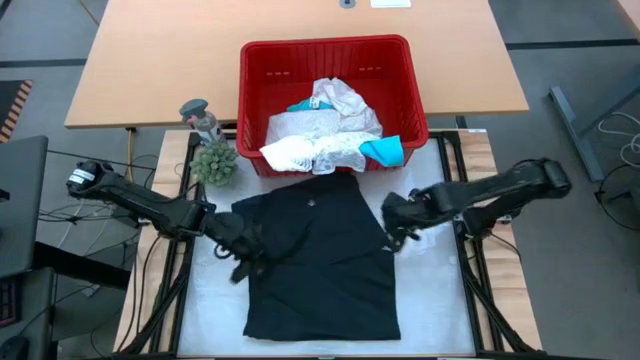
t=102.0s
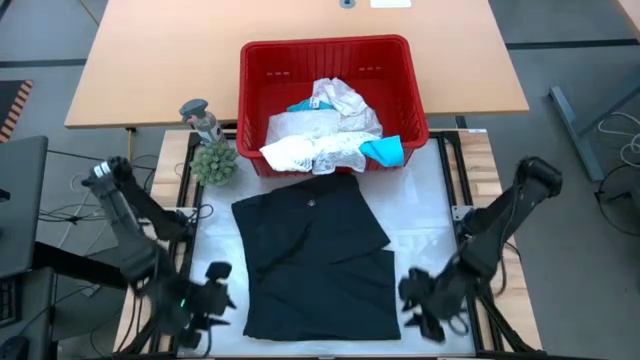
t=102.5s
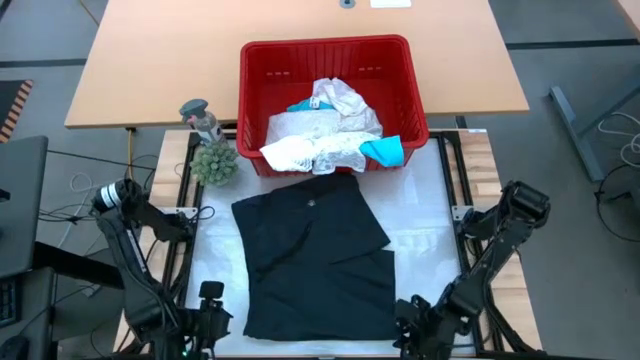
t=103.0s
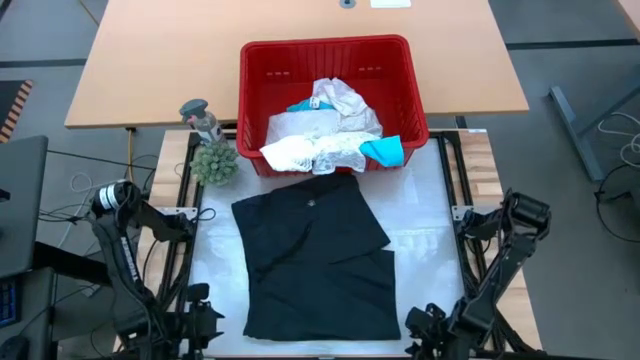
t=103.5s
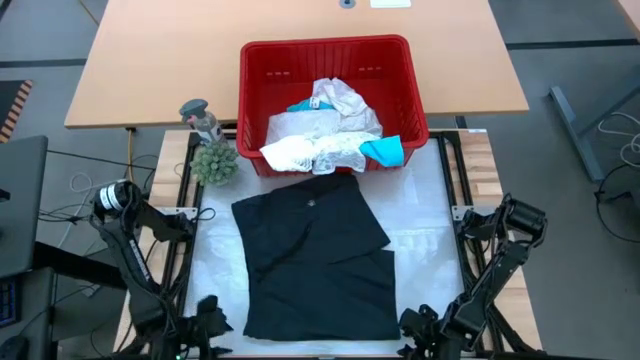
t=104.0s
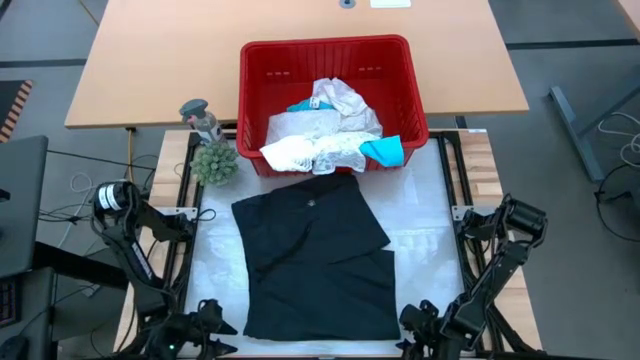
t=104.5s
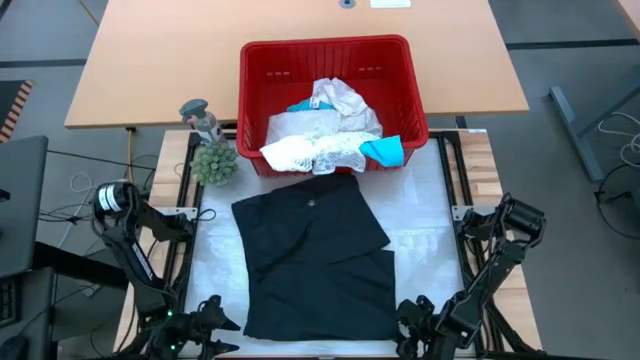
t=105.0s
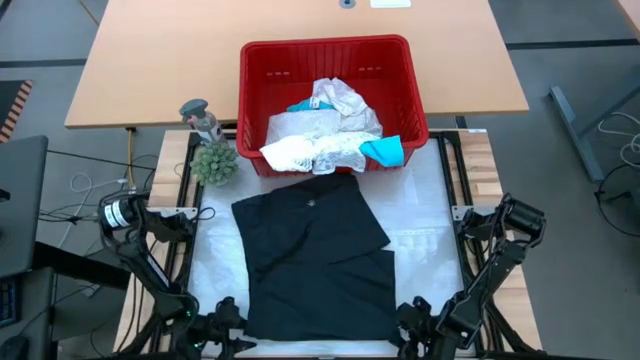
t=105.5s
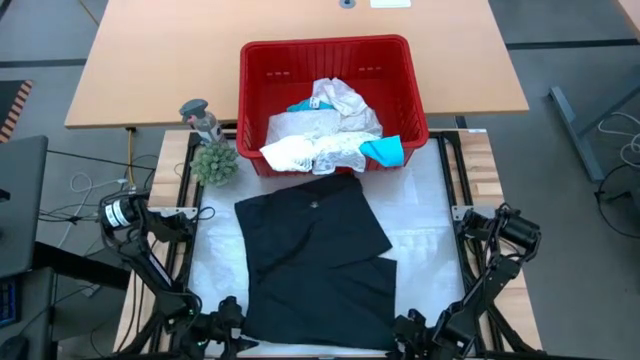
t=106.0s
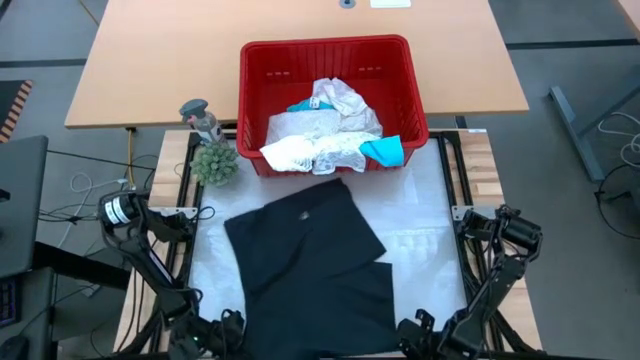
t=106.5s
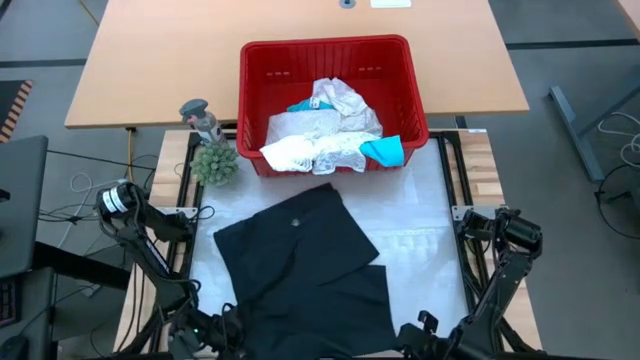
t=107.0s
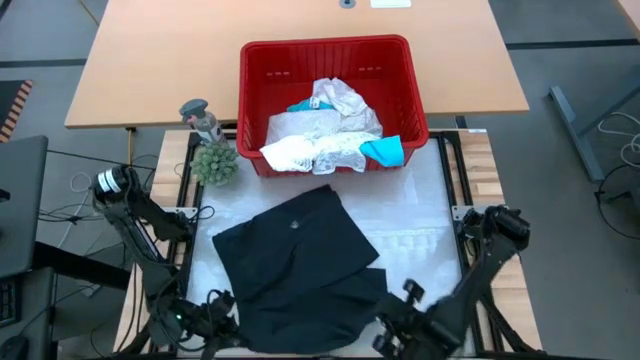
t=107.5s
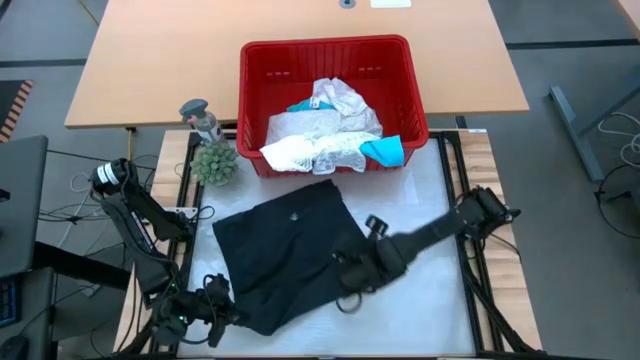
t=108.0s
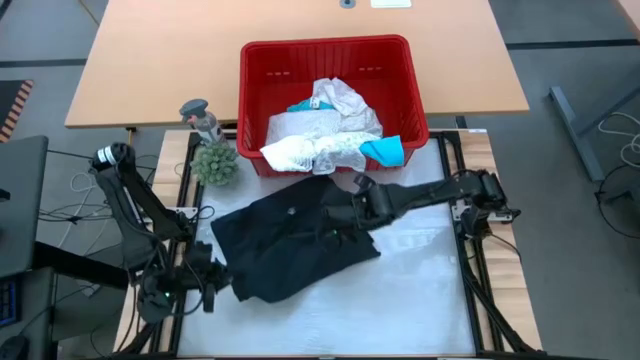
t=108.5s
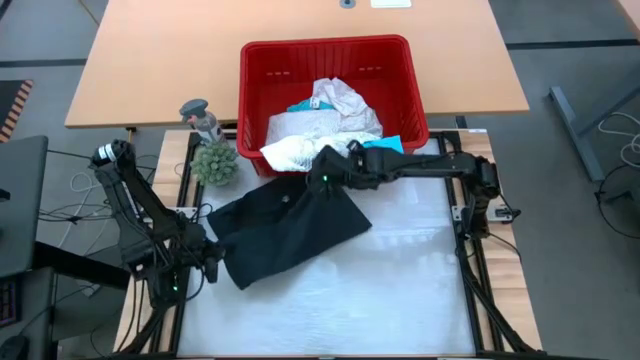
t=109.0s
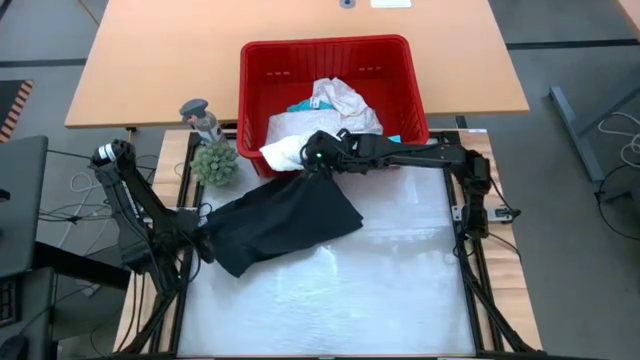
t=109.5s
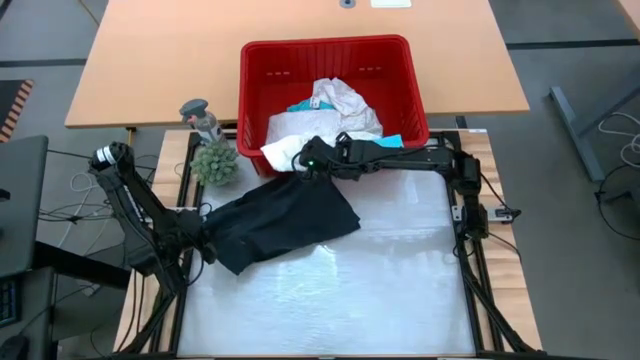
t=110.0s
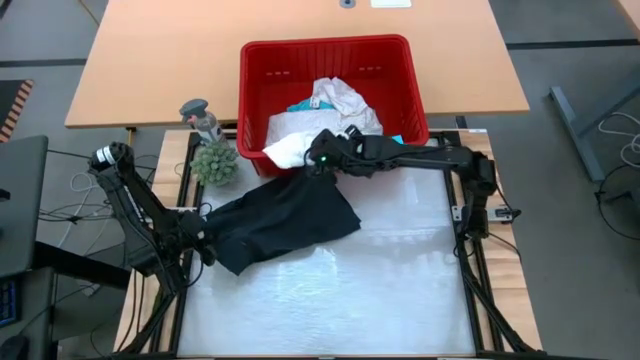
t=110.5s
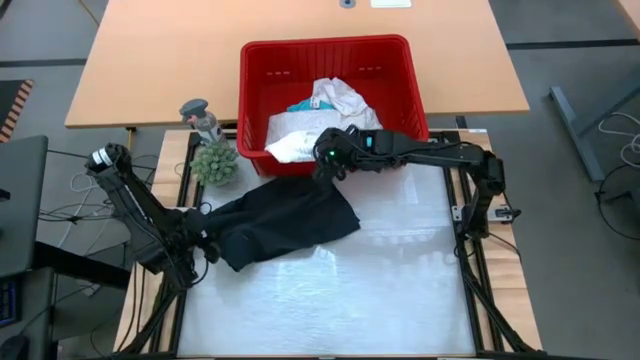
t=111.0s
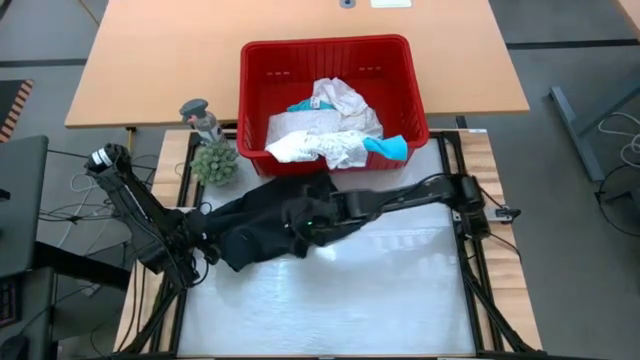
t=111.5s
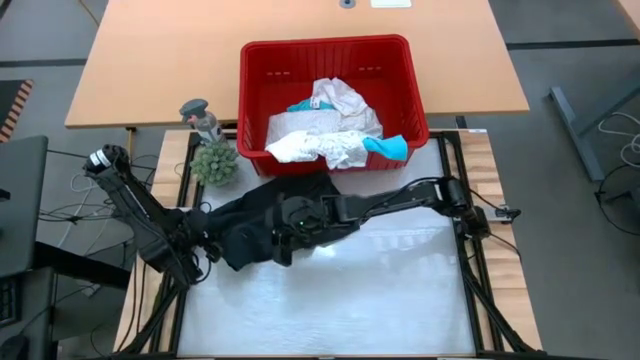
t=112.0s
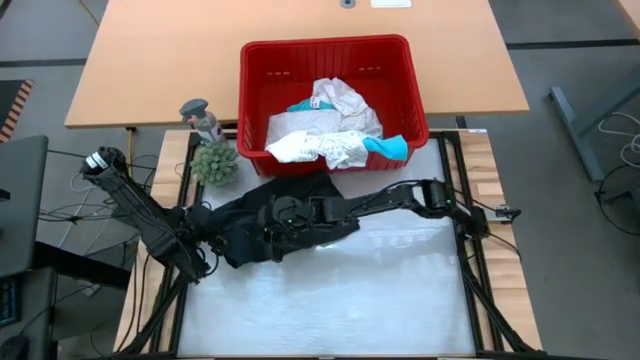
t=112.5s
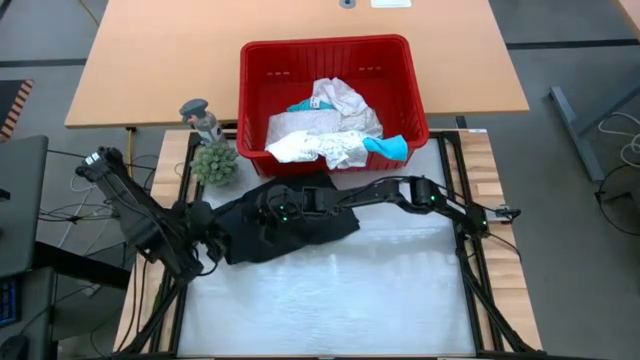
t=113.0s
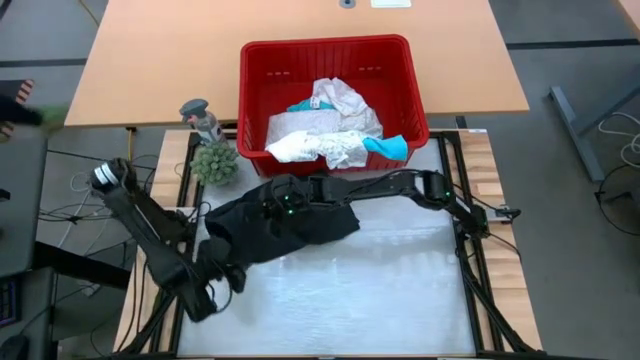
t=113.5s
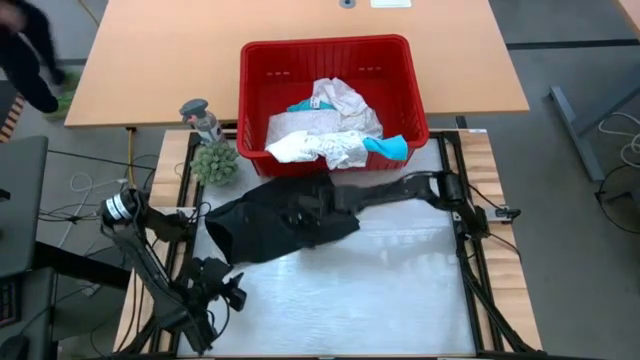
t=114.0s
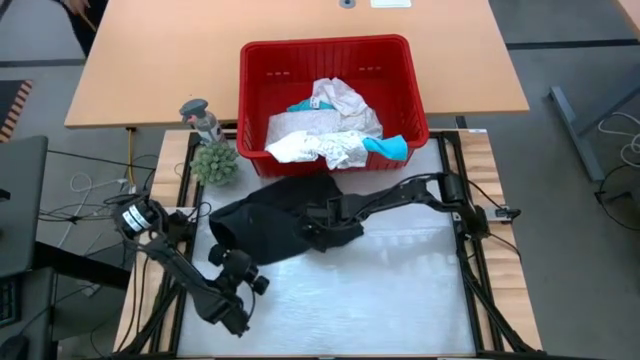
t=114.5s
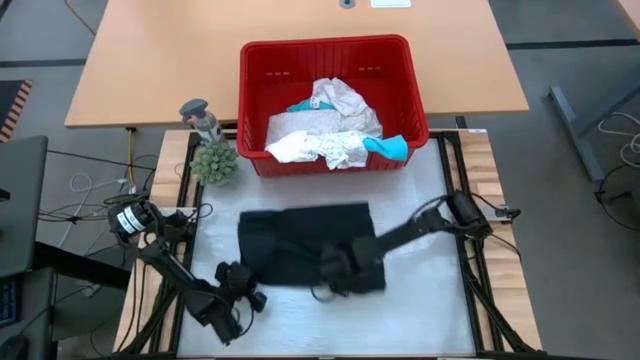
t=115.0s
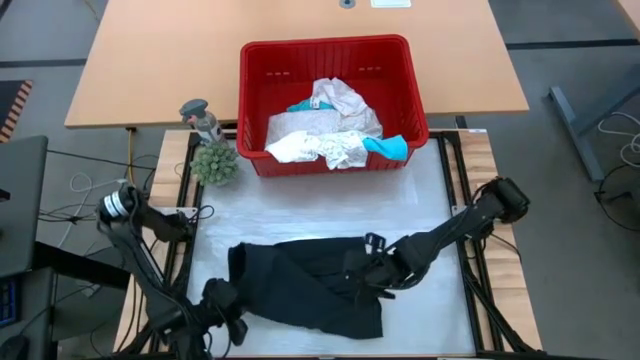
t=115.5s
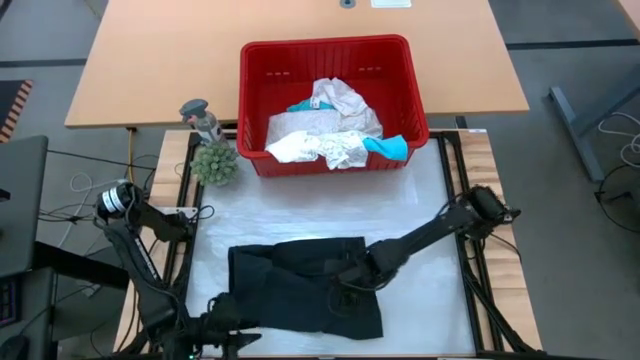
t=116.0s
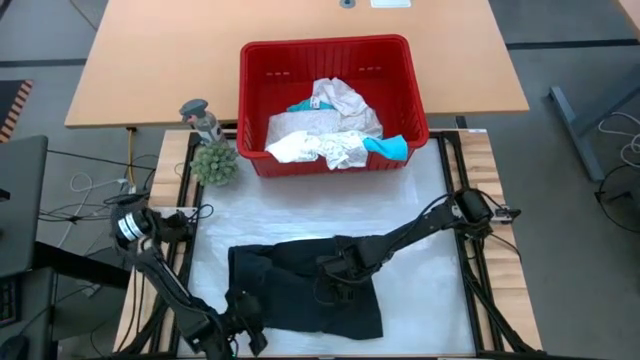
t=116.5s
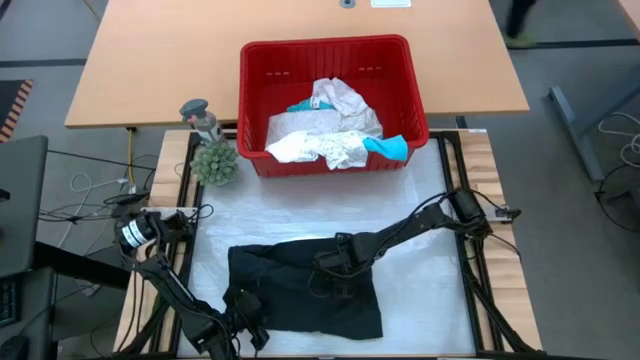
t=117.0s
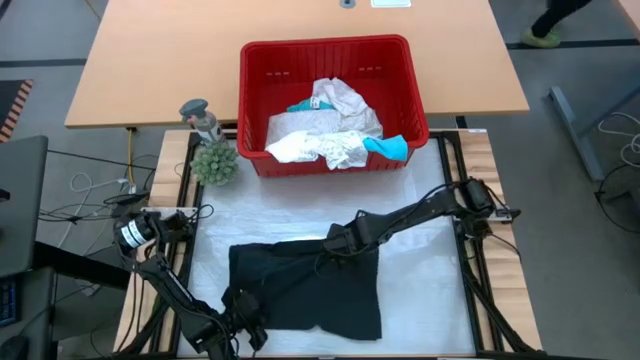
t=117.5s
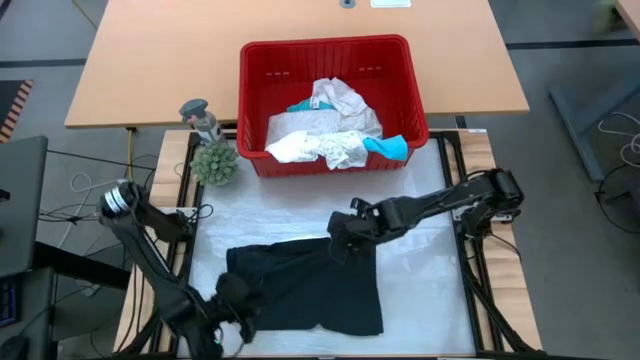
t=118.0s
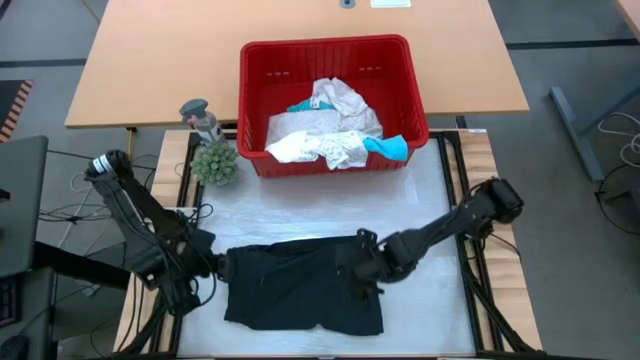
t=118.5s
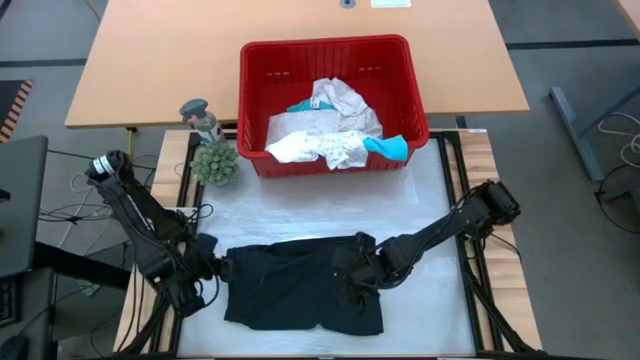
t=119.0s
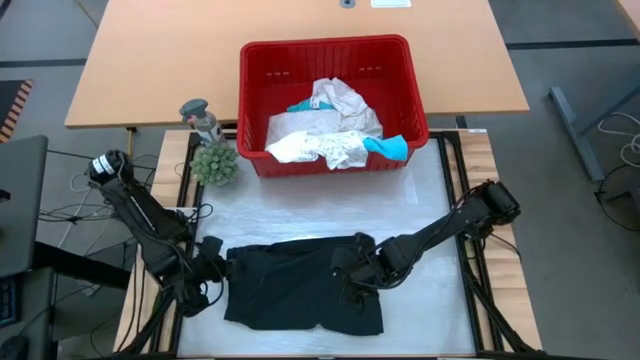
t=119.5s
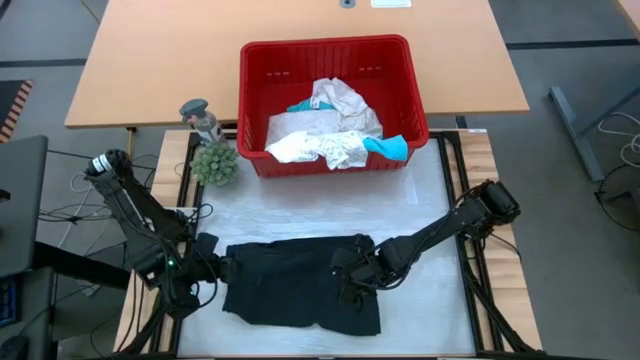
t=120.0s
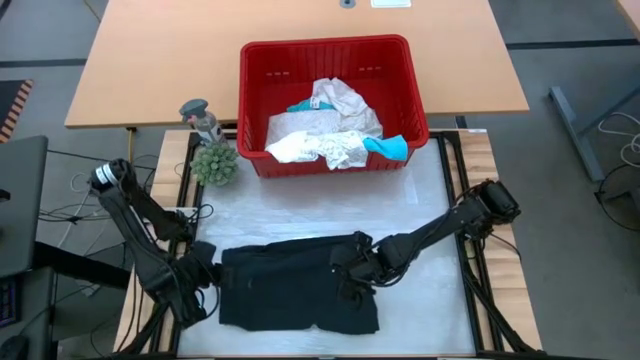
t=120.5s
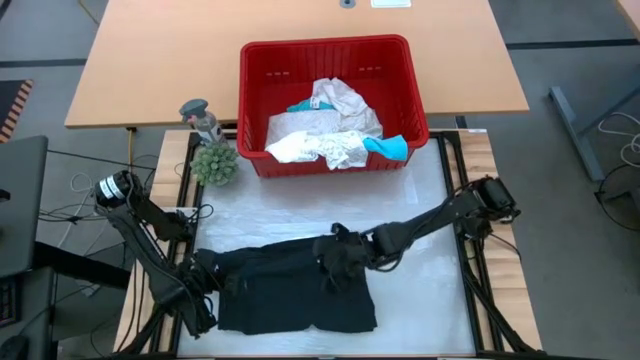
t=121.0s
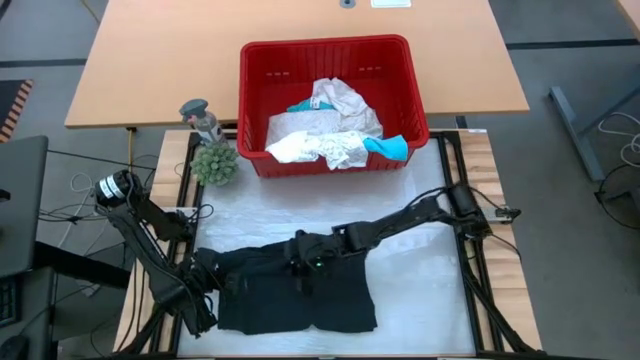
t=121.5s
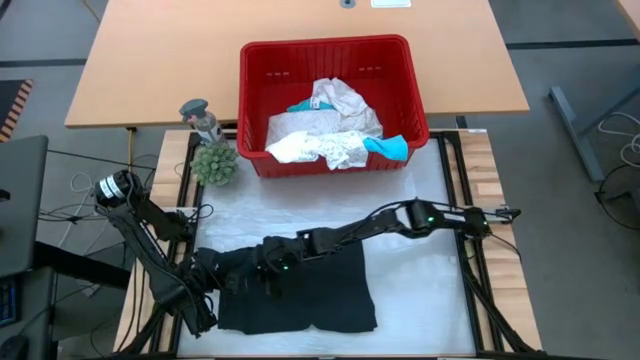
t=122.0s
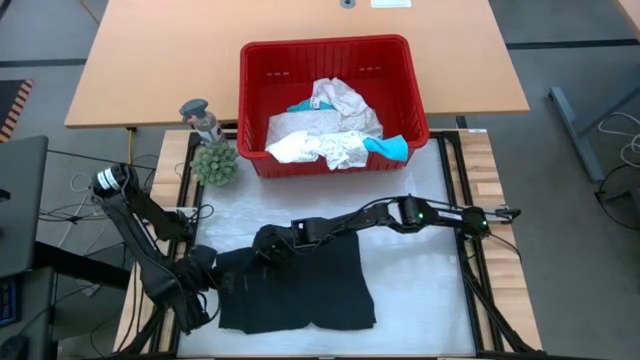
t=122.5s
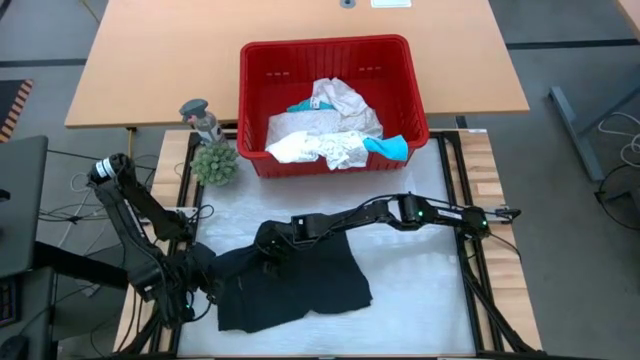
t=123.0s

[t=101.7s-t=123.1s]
Task: Fold Laundry from Bin
Fold the black shorts
